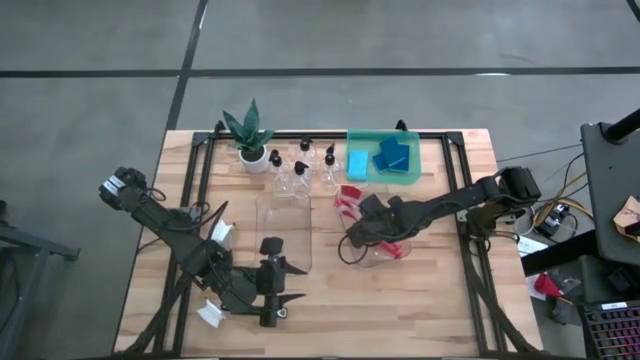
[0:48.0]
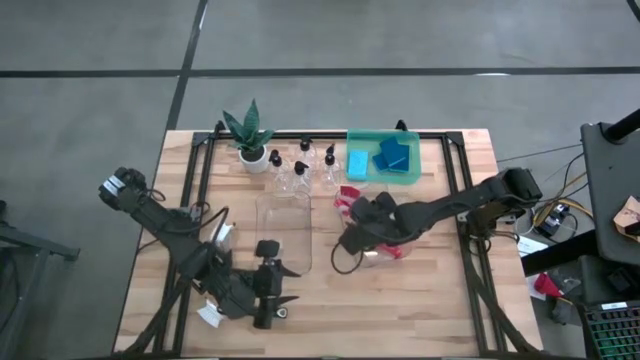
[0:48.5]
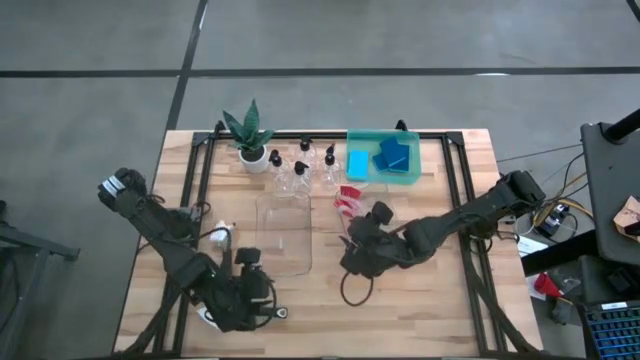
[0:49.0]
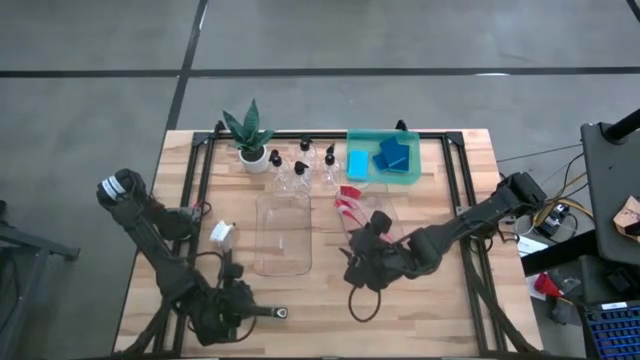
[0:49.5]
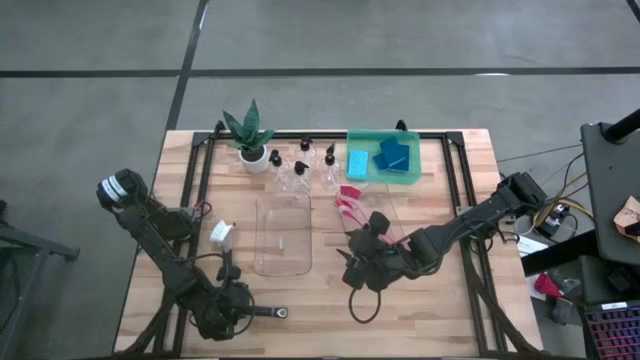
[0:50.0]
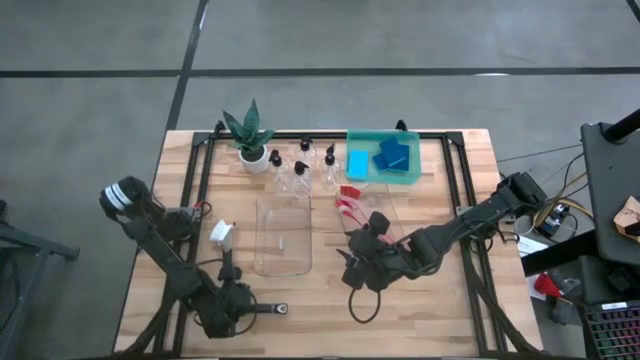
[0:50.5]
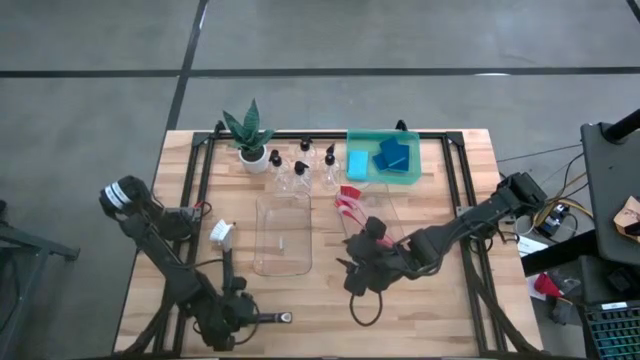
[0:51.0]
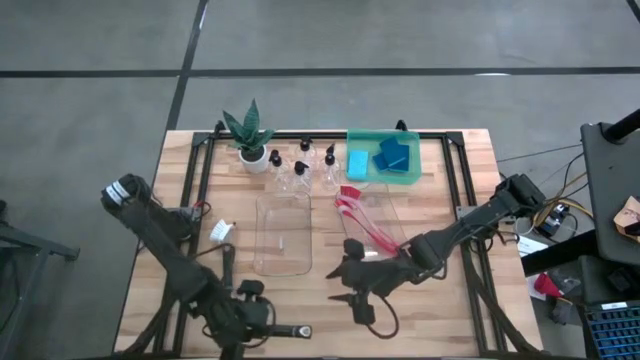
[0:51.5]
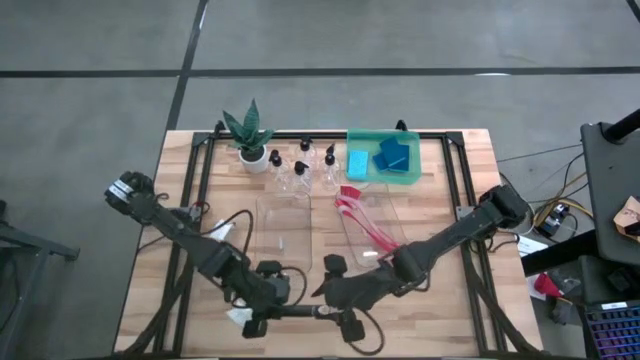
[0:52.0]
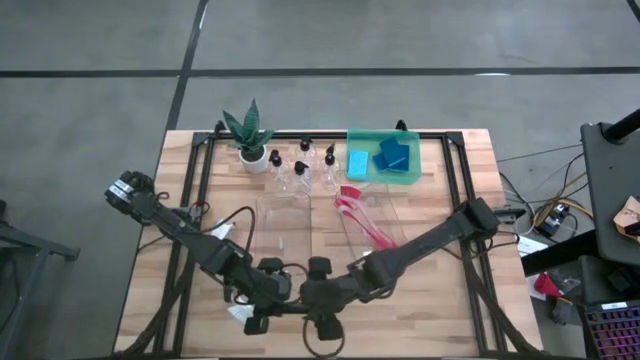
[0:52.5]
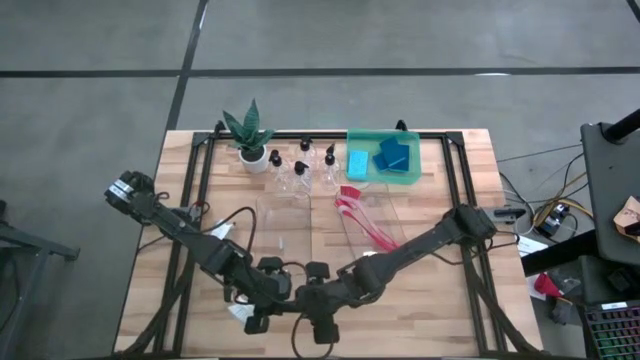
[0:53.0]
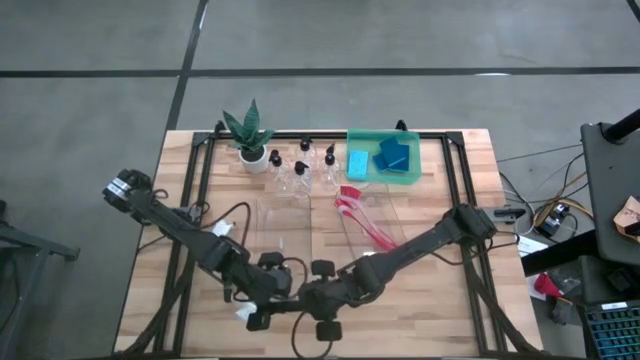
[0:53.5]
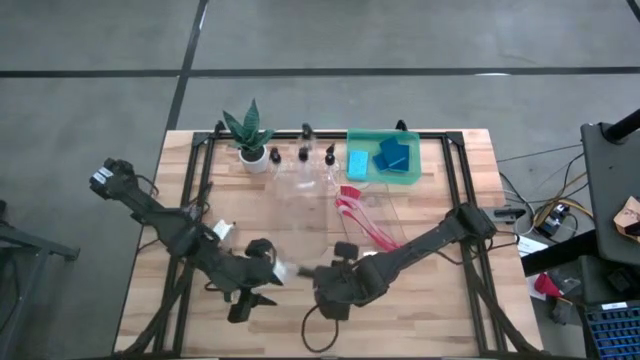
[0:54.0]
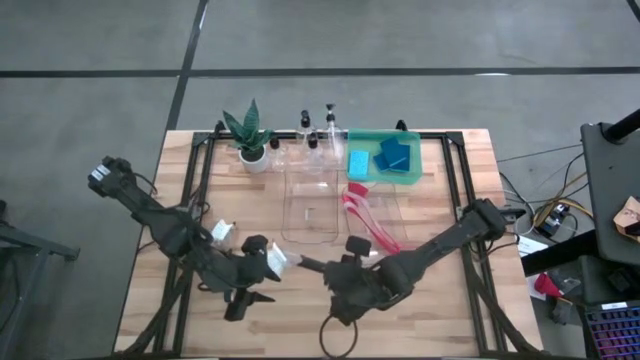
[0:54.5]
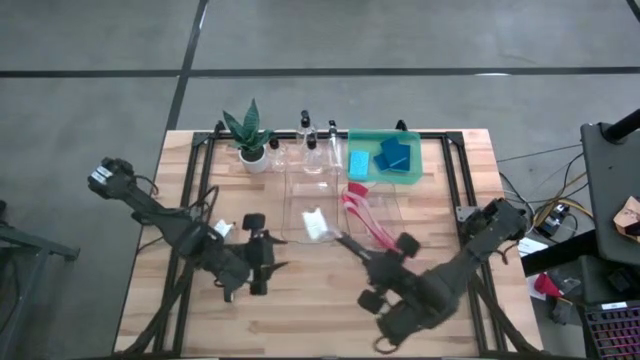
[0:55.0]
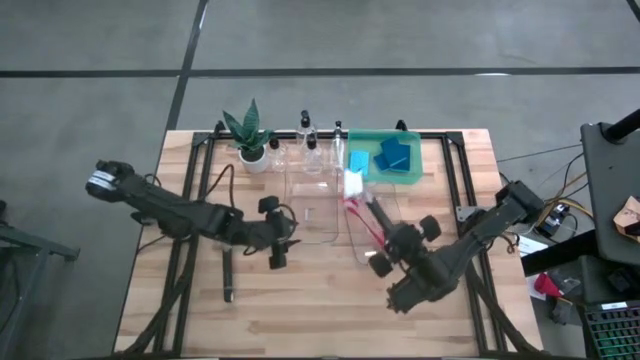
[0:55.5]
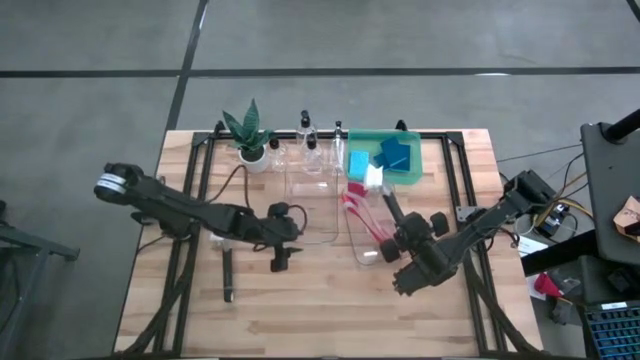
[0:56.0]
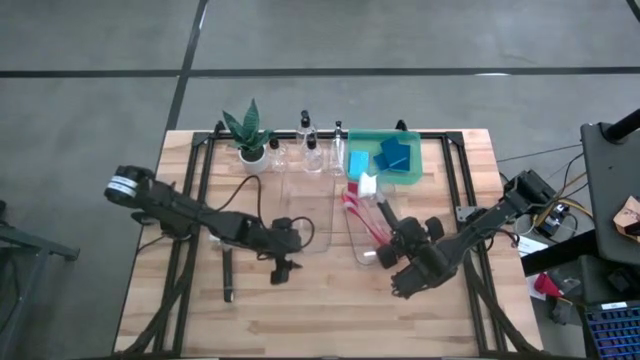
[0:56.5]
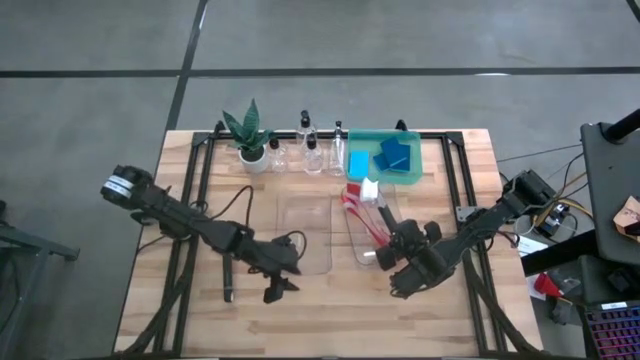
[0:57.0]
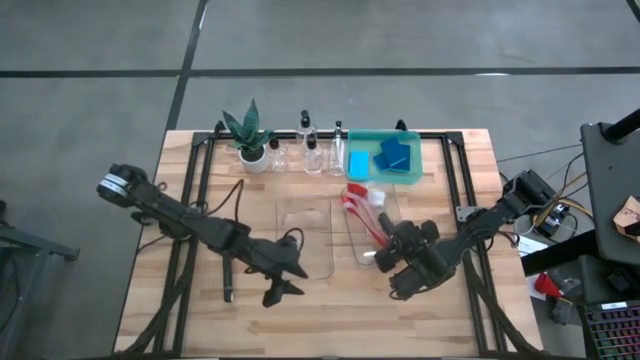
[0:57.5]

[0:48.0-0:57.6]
Task: Pick & Place Kitchen Sink Supplies
Put the black dish brush into the right transparent bin

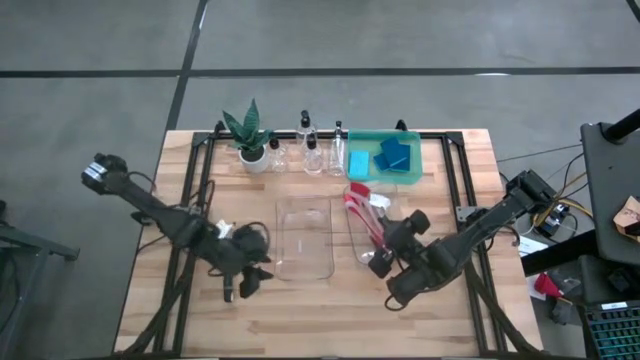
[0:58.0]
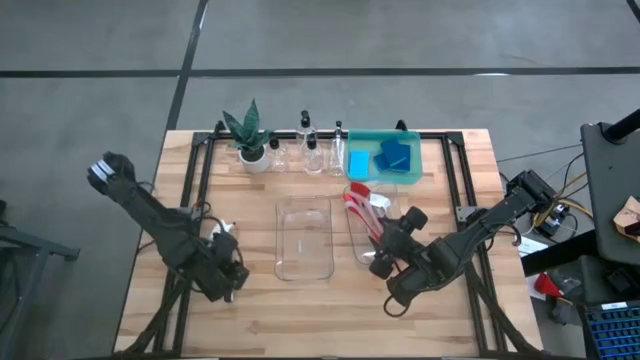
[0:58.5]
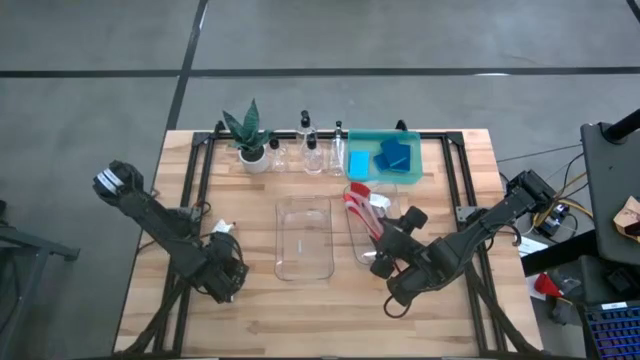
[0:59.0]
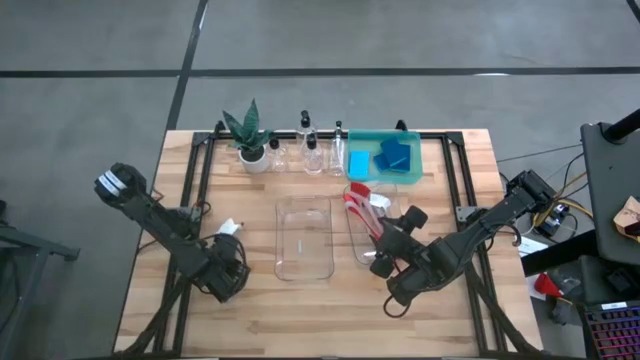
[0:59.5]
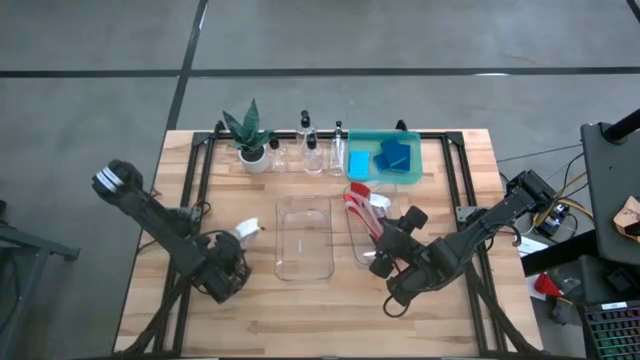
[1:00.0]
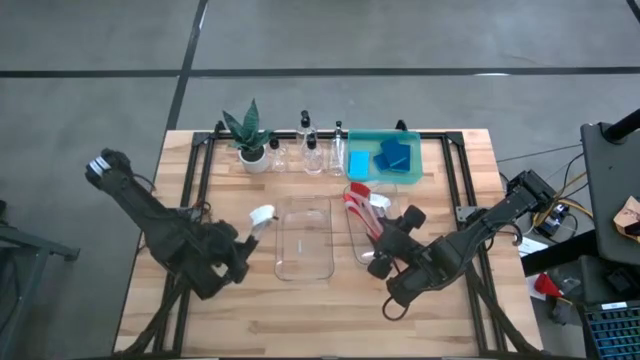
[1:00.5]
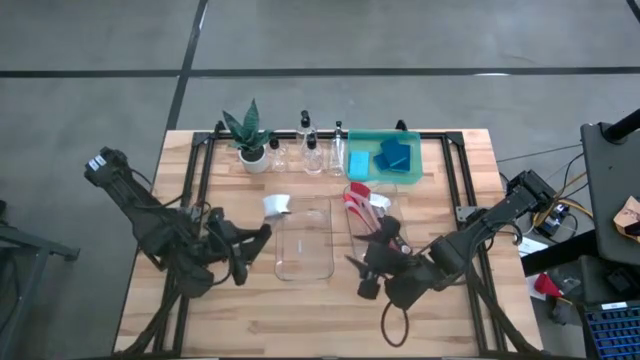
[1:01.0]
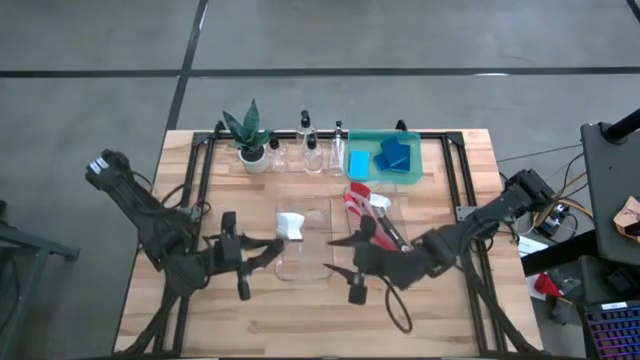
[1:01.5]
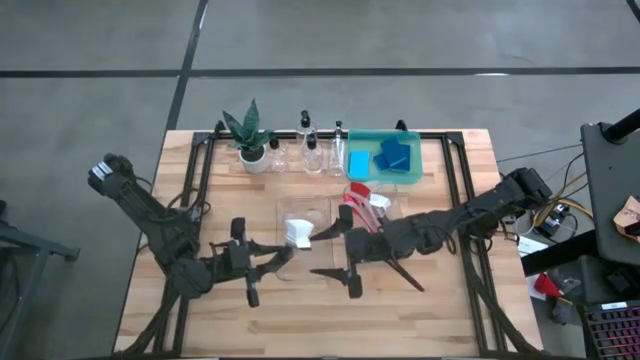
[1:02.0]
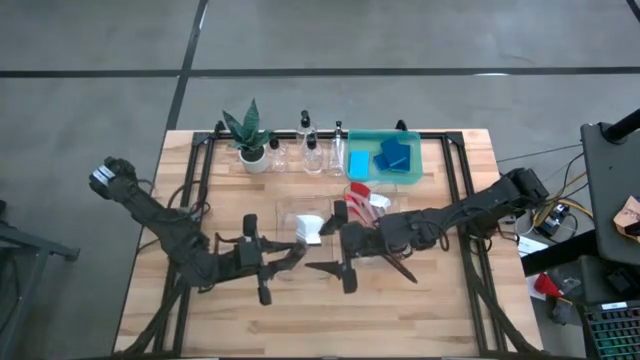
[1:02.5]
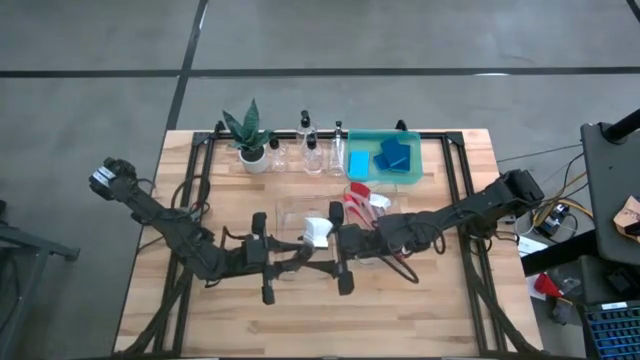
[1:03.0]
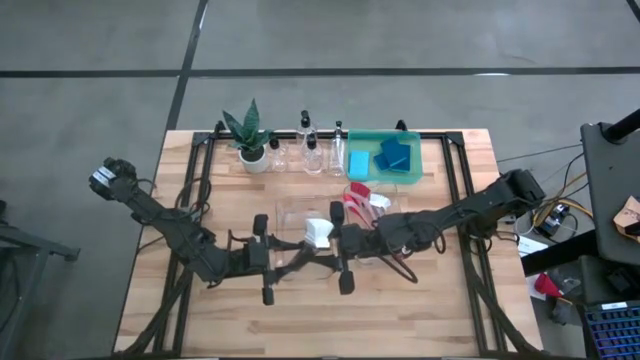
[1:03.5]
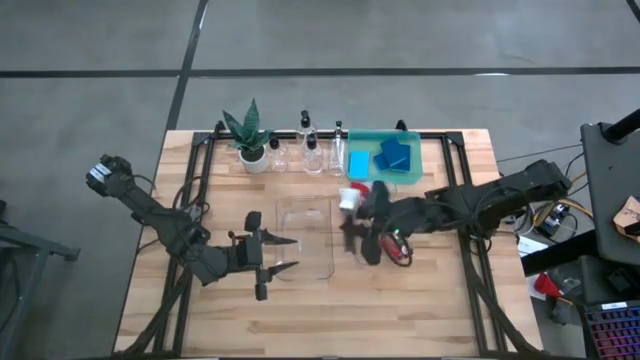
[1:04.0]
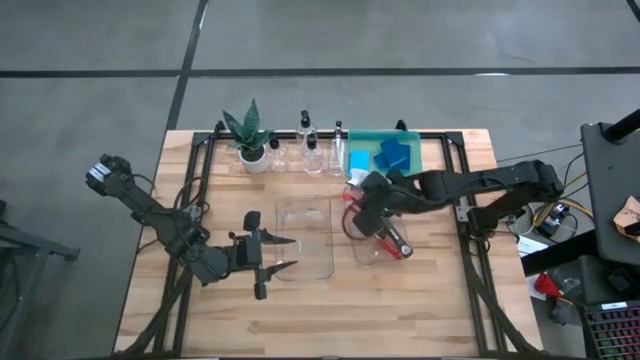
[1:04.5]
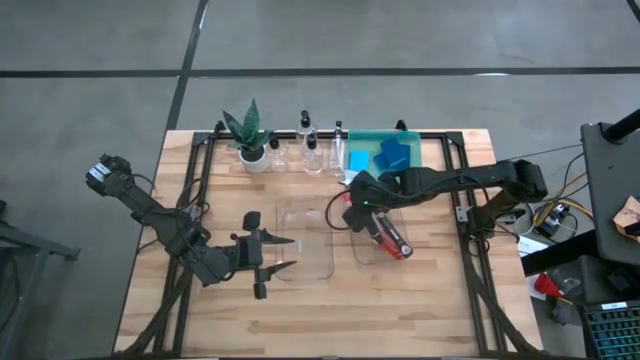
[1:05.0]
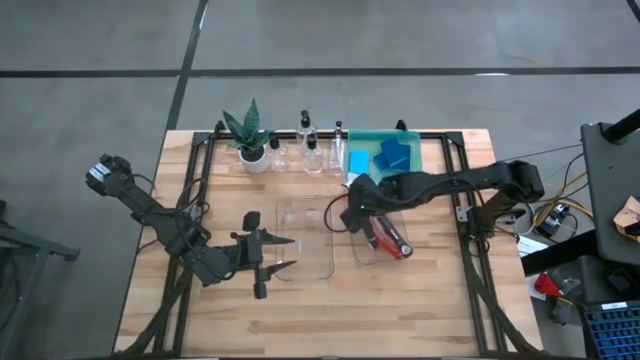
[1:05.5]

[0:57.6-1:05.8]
Put the black dish brush into the right transparent bin

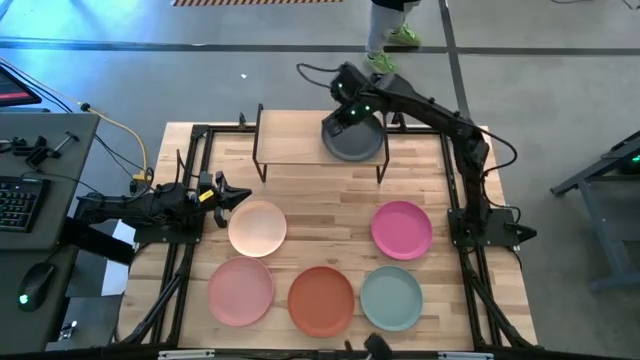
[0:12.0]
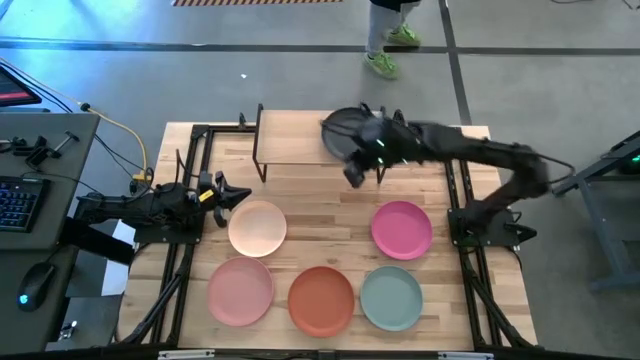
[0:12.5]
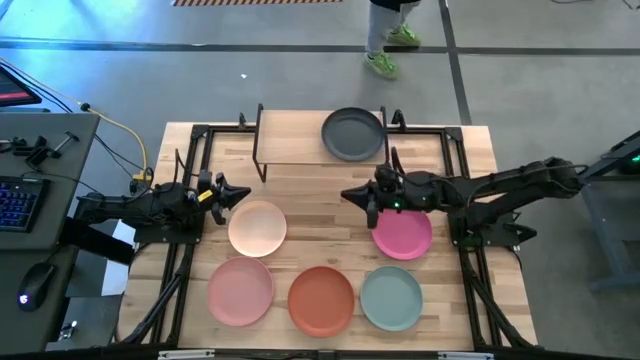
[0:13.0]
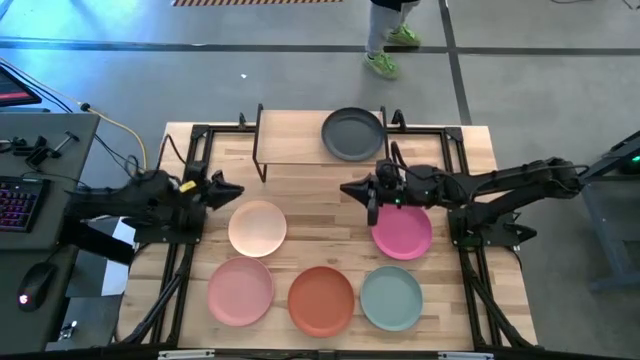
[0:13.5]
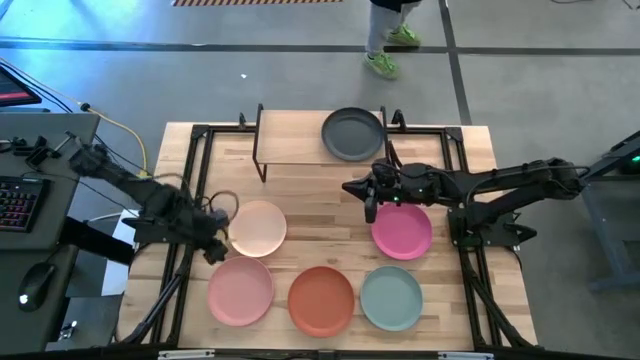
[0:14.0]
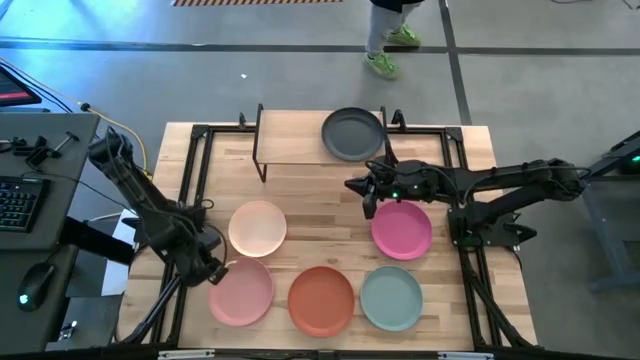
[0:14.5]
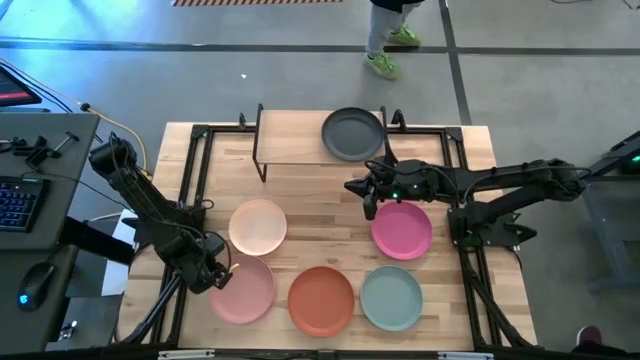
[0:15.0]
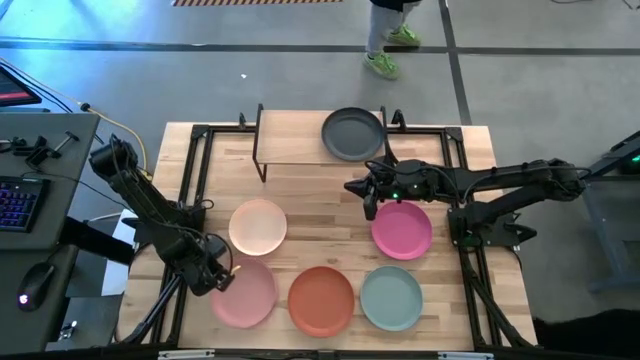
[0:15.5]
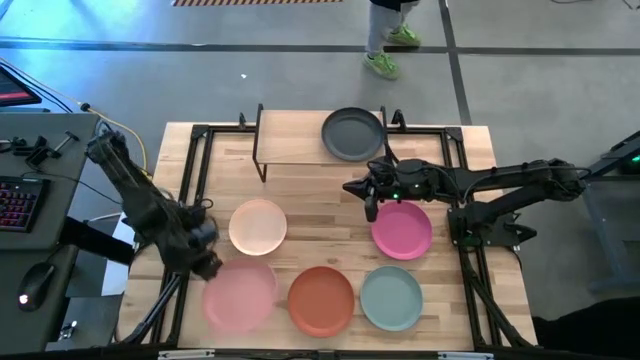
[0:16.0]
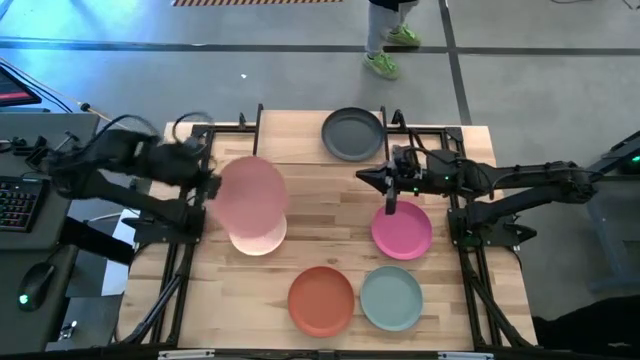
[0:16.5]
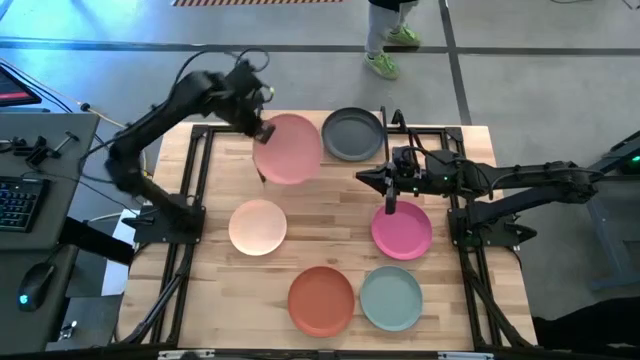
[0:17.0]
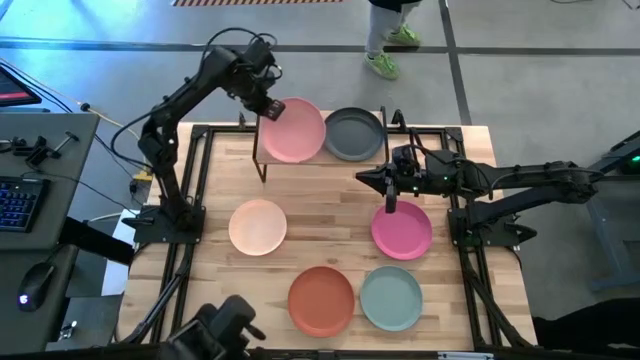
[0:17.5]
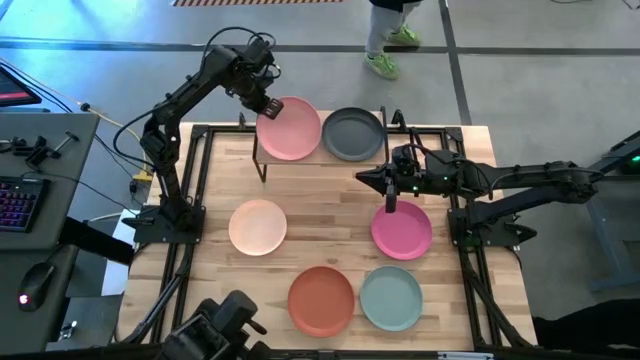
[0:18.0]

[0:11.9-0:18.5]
Task: Place and stack plates onto a shelf
Put the light pink plate on the shelf
